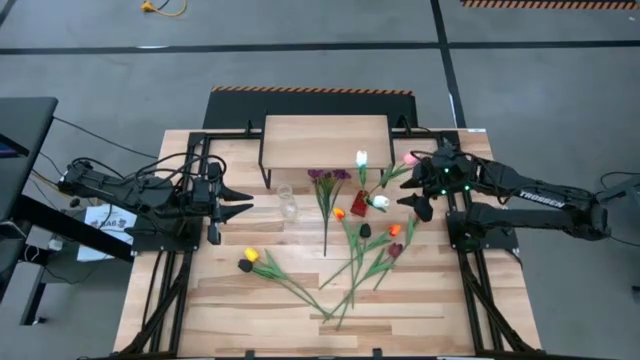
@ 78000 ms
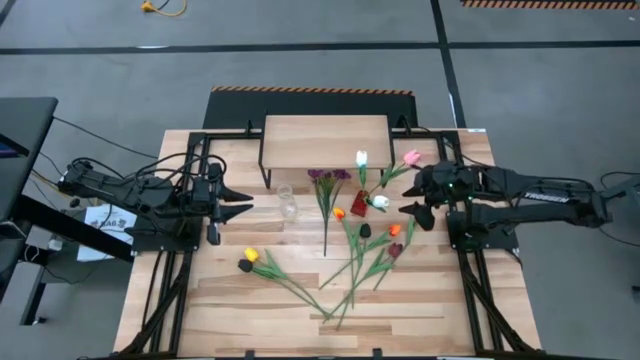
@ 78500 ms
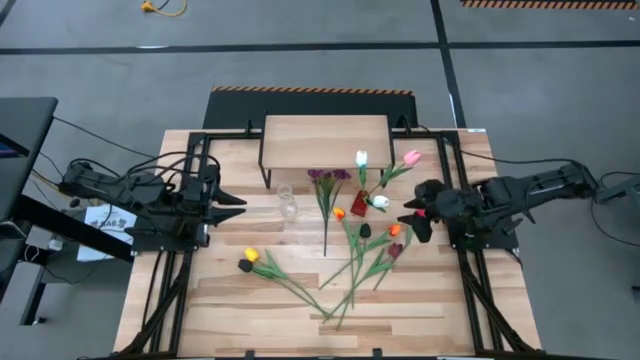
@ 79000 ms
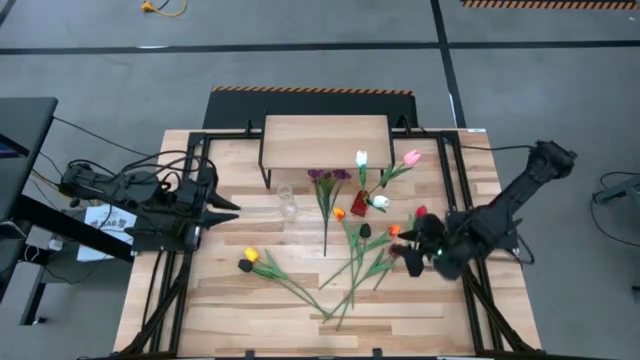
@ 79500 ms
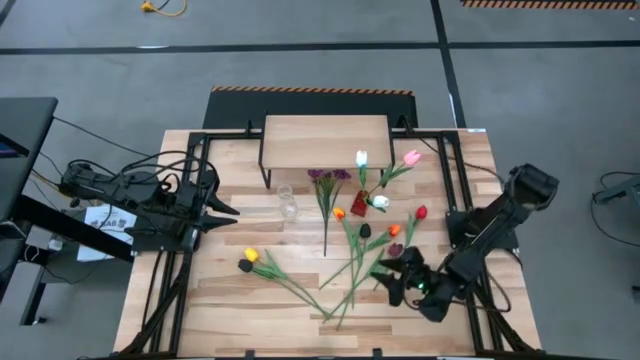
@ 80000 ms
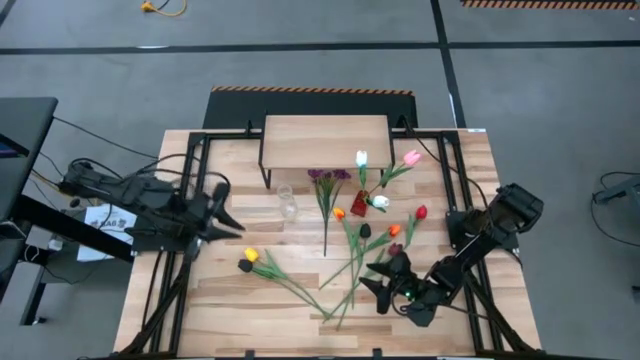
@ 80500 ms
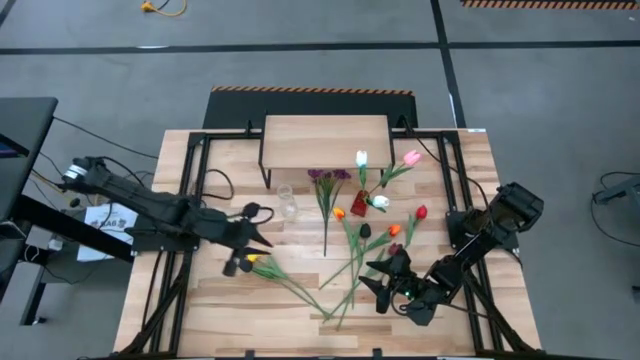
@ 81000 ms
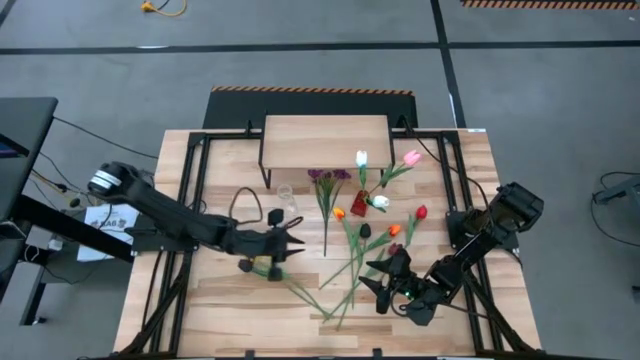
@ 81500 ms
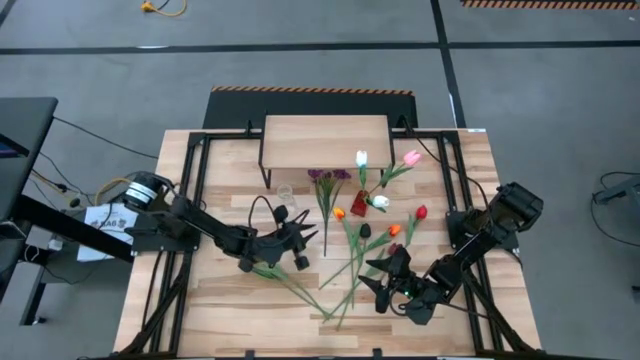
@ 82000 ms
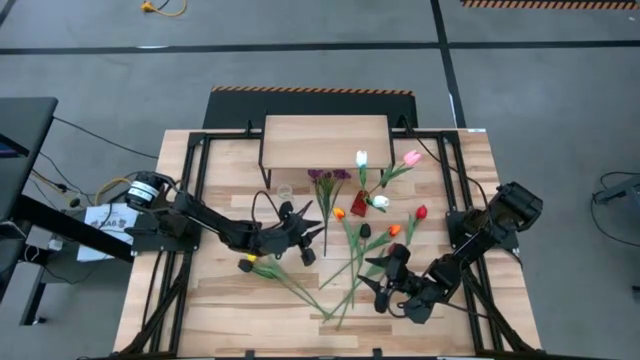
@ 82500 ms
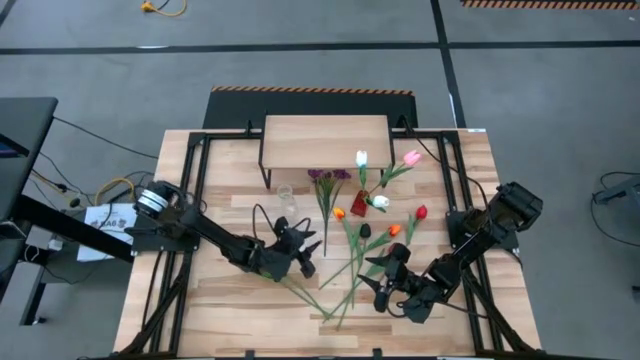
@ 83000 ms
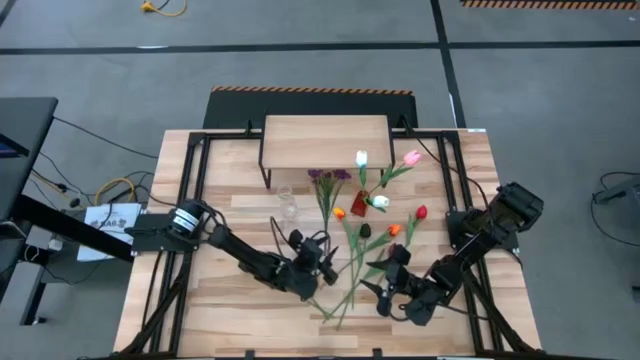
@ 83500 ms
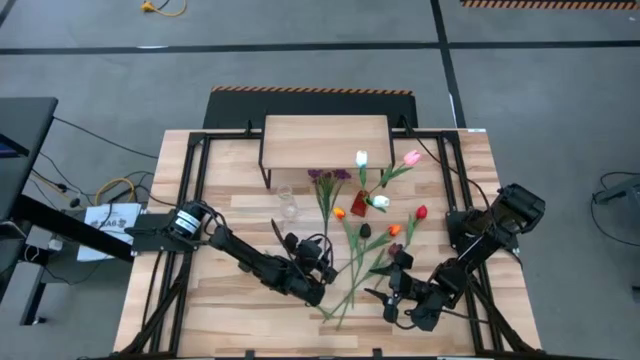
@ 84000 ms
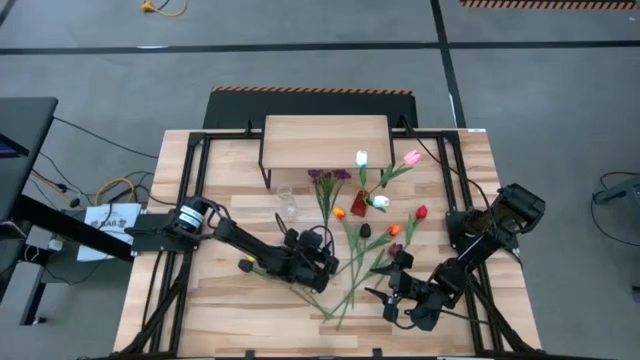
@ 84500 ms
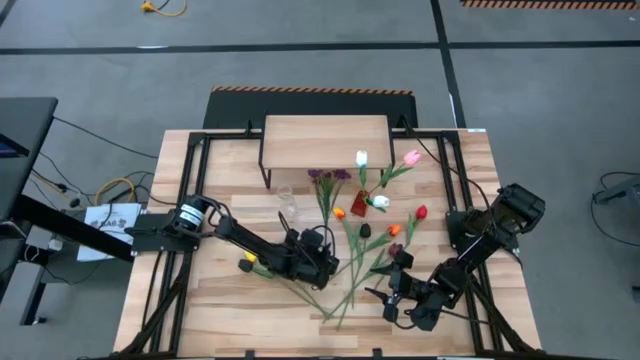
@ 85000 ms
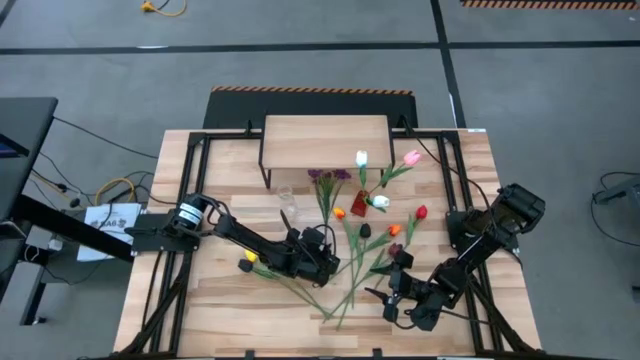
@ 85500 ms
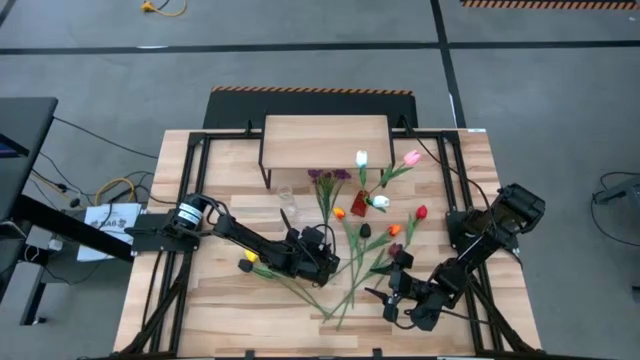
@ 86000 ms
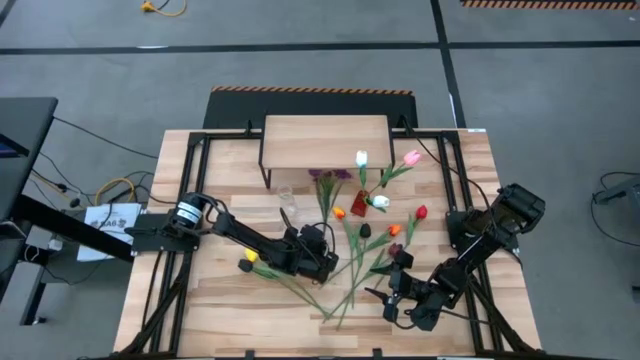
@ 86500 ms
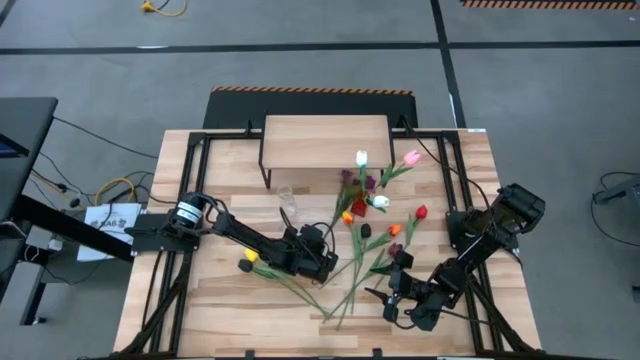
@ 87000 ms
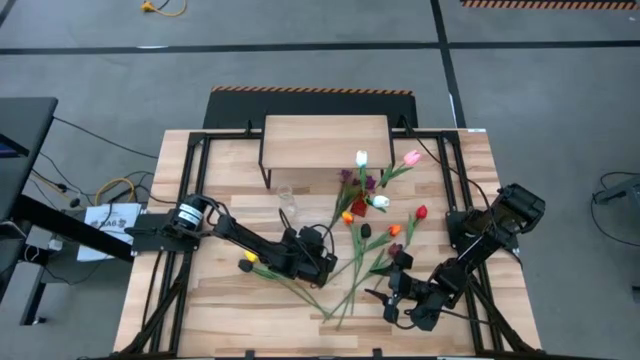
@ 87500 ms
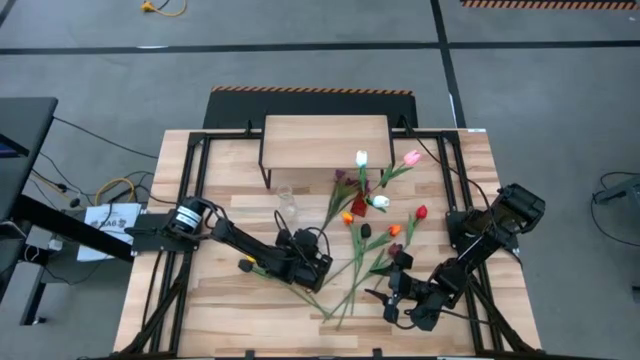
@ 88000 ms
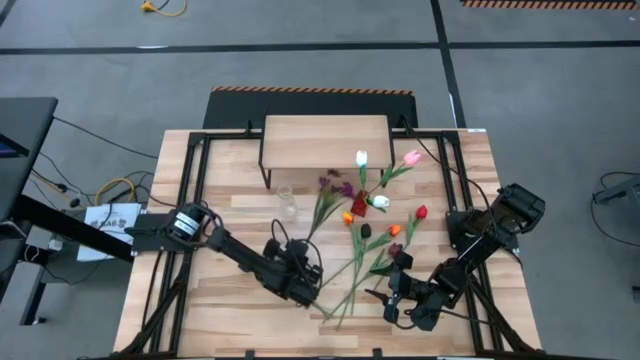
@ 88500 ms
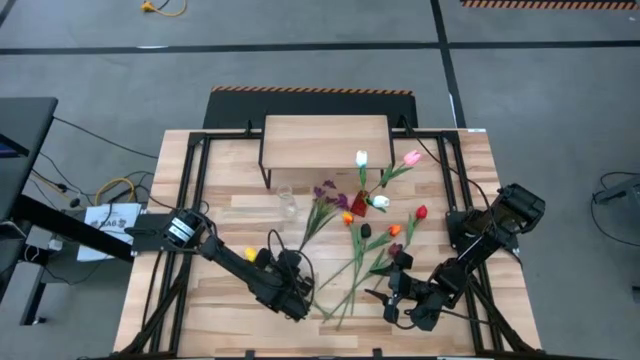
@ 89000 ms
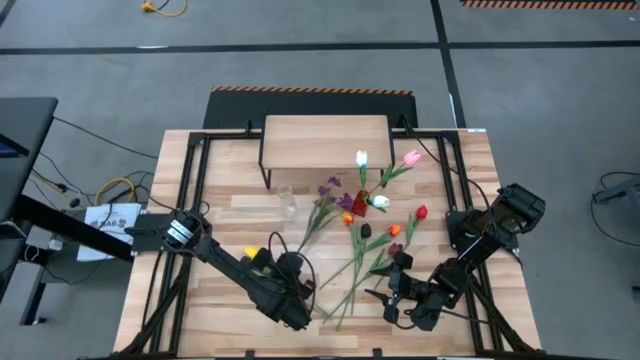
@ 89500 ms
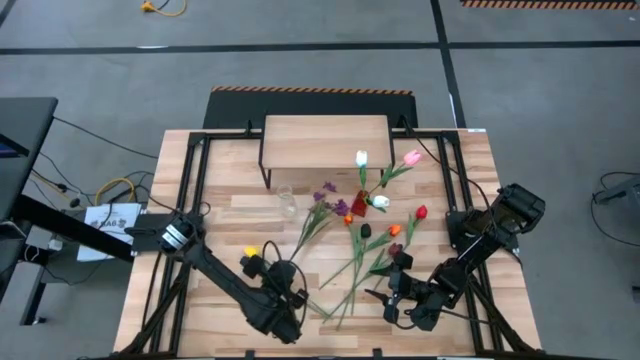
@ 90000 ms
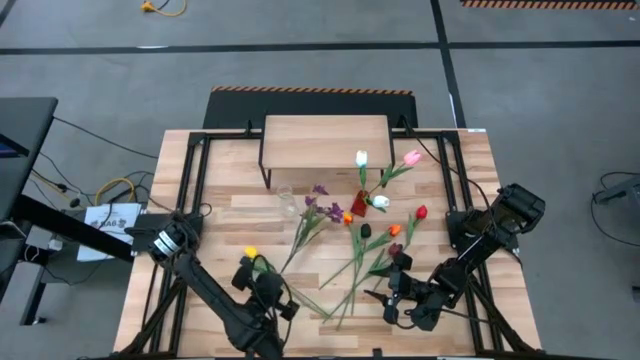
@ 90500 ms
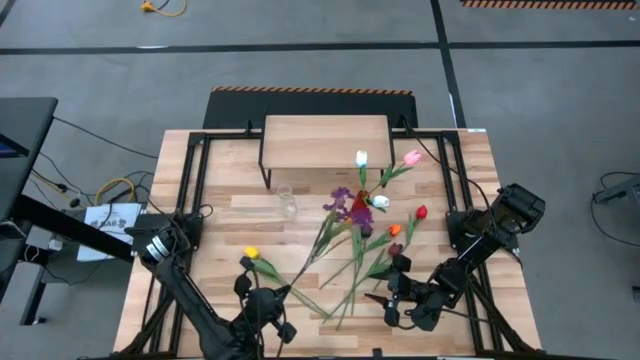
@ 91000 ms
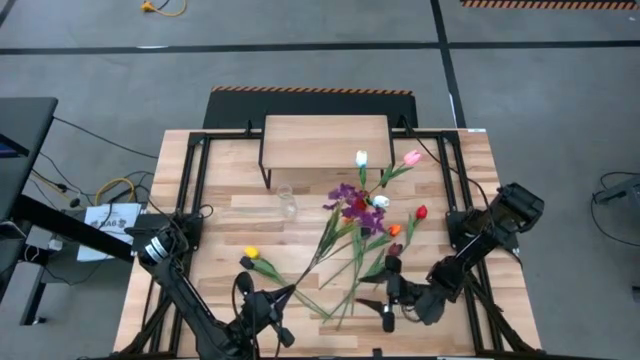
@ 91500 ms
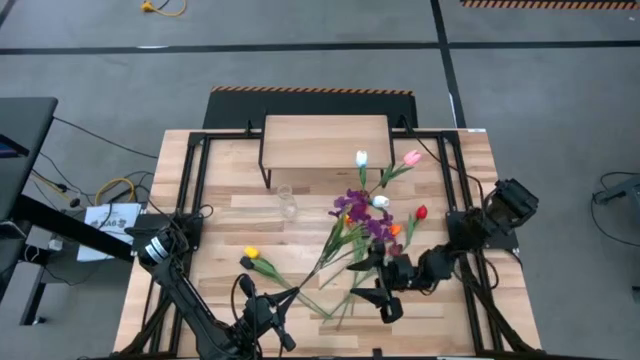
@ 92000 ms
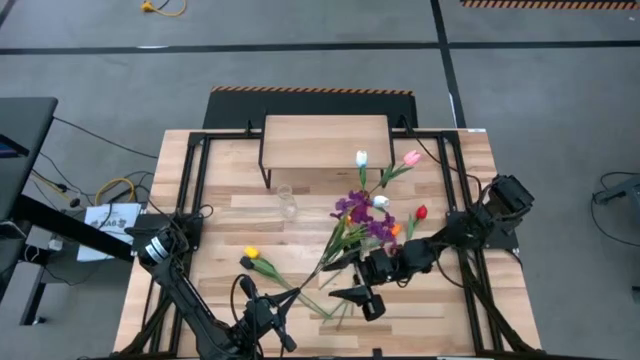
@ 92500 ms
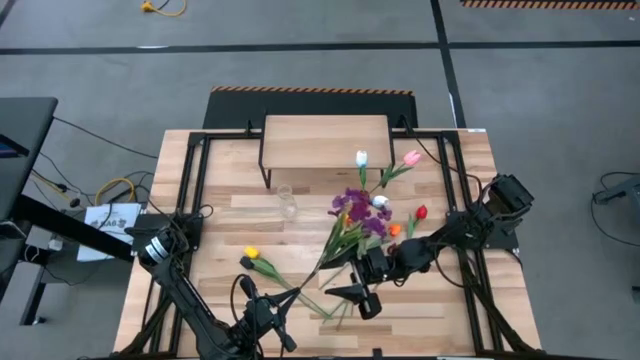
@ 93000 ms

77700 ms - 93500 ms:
Task: Pick and place flowers into a vace then onto a shelf
Put the purple flowers into the red flower vase

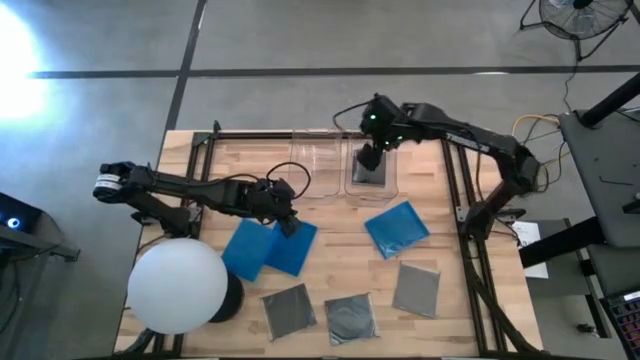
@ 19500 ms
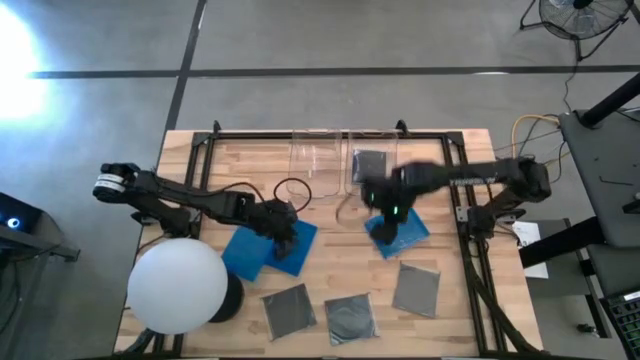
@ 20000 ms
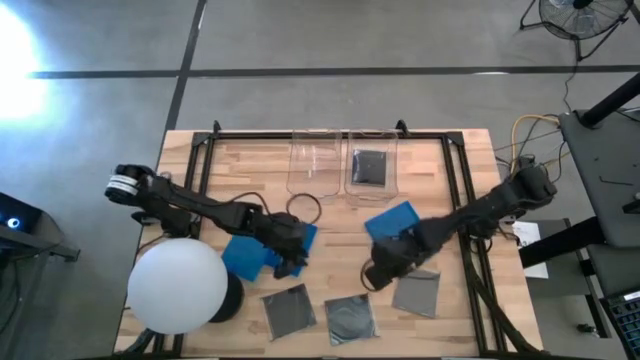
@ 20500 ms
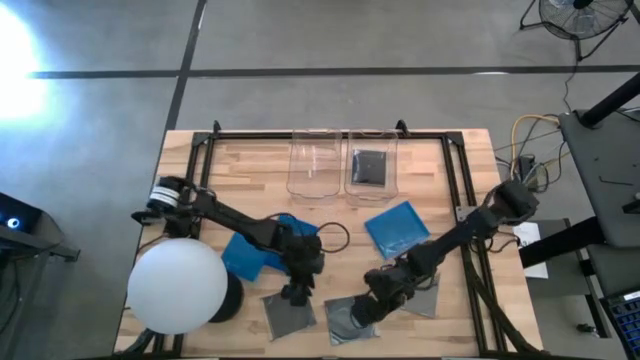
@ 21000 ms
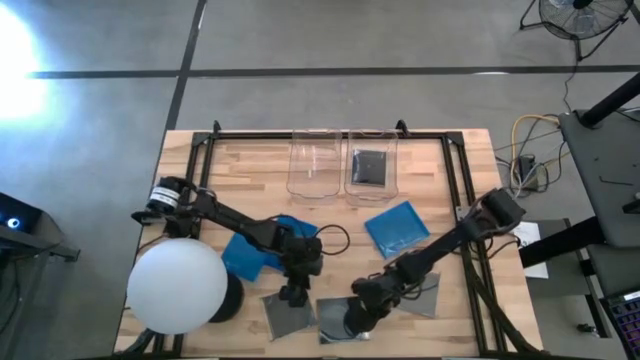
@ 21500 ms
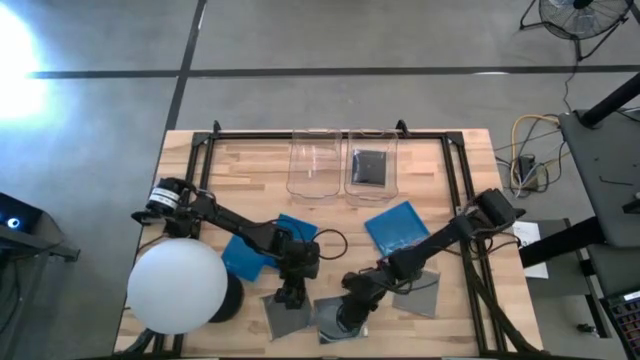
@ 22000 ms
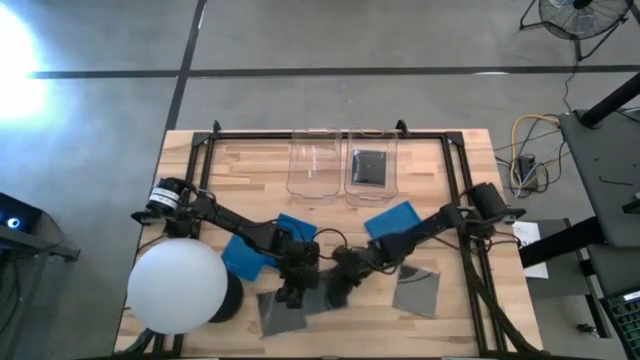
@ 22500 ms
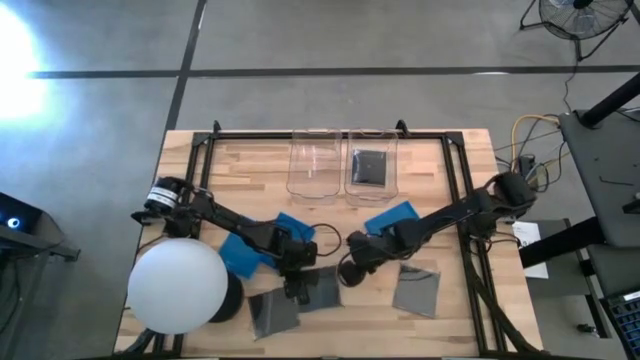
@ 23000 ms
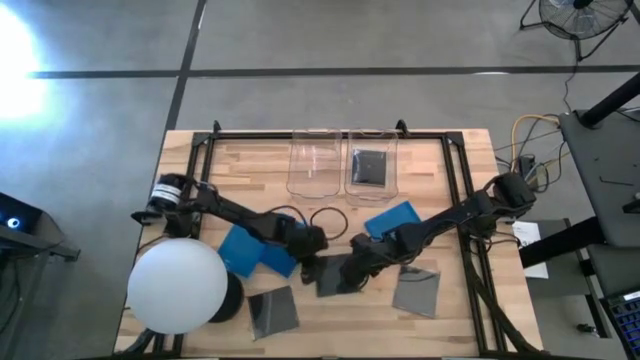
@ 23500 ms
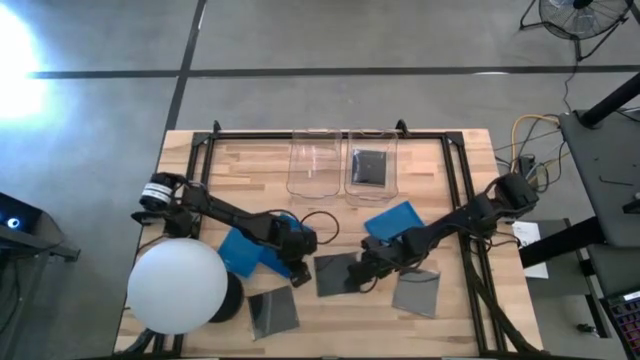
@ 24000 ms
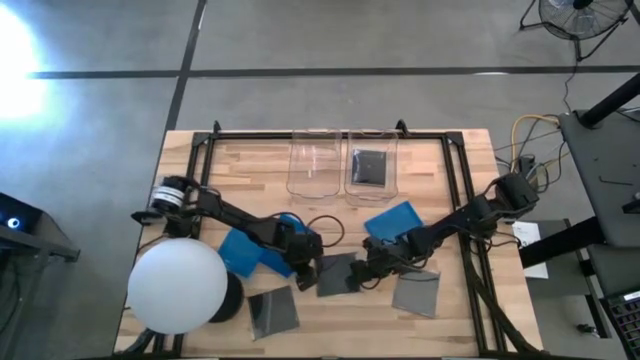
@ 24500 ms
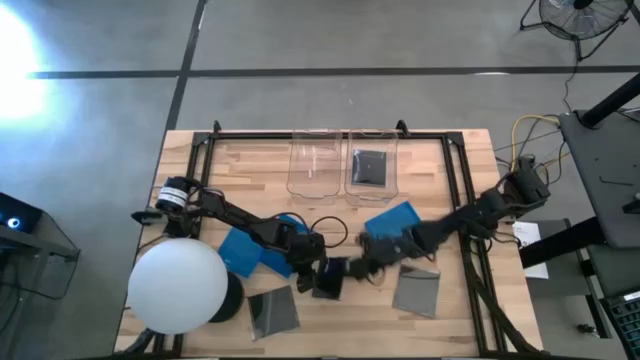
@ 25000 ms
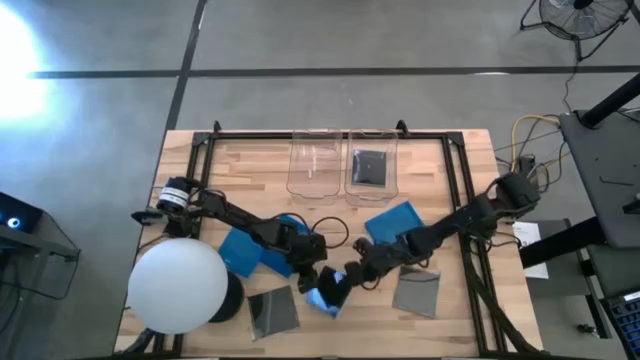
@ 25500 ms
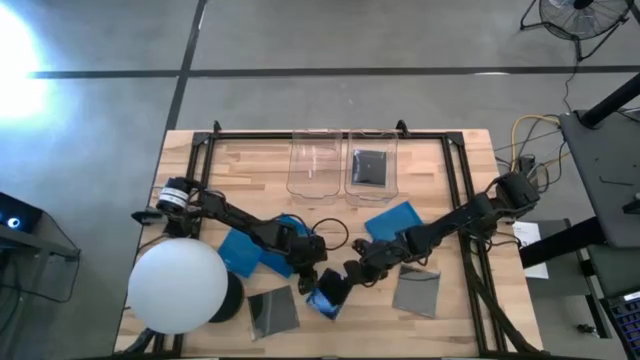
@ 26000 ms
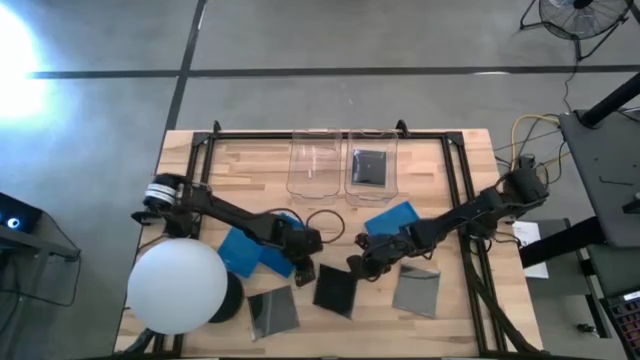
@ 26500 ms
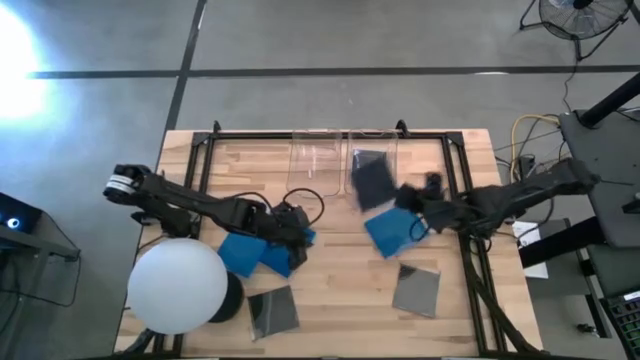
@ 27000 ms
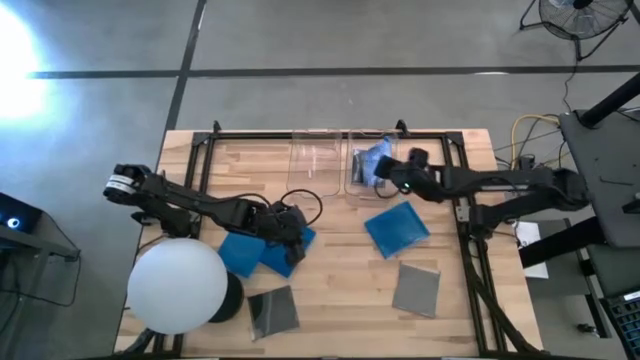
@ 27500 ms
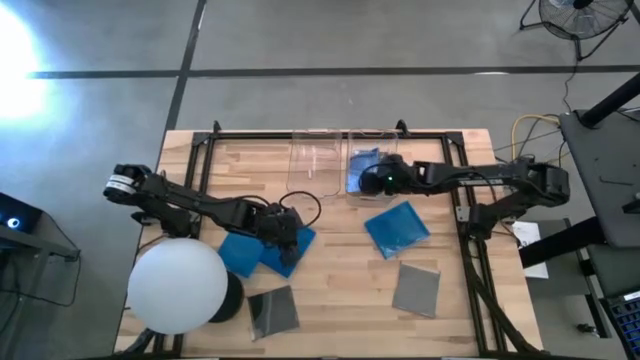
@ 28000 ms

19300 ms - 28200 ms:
Task: Pick & place jewel cases by type
Put the black CD case into the right transparent bin
